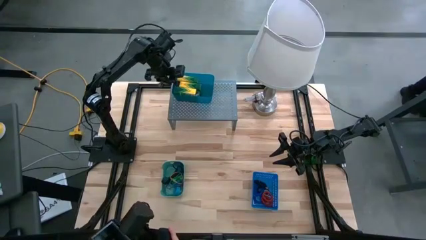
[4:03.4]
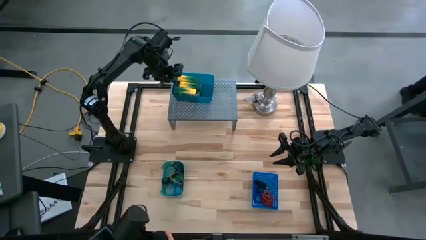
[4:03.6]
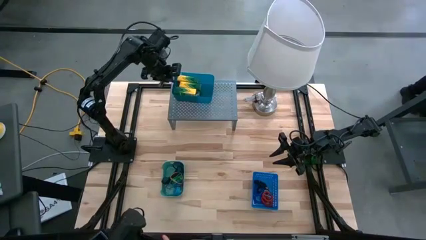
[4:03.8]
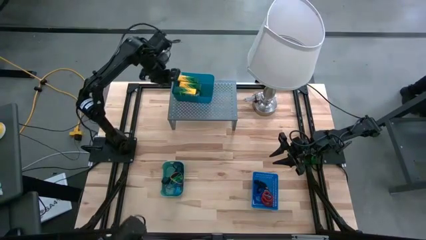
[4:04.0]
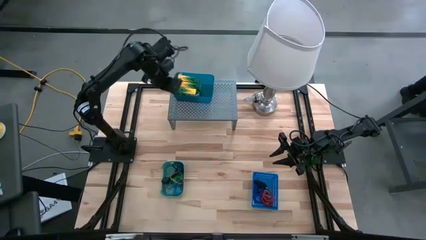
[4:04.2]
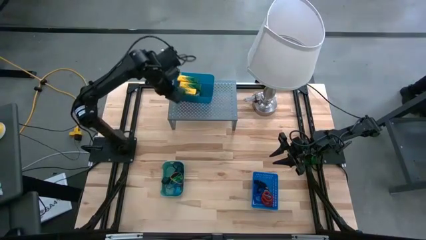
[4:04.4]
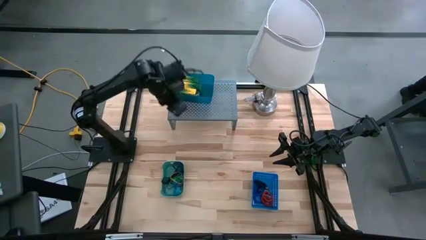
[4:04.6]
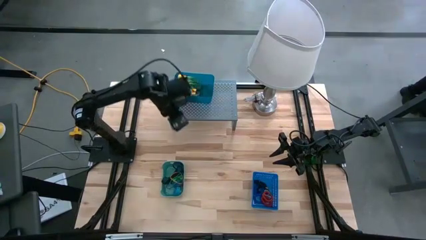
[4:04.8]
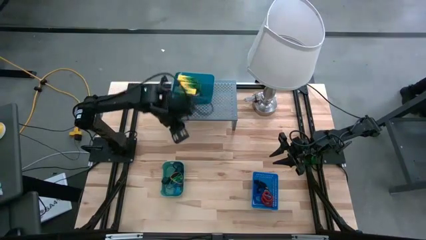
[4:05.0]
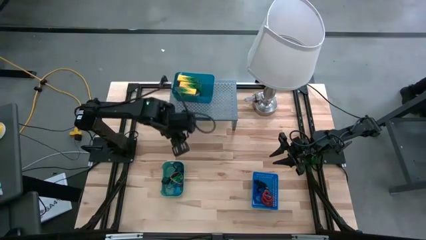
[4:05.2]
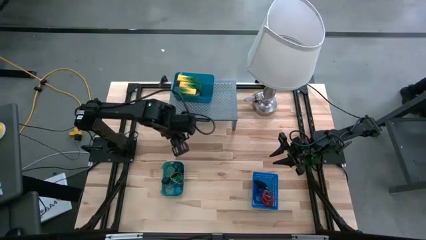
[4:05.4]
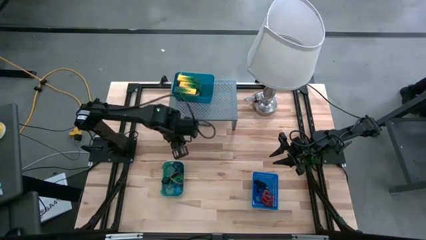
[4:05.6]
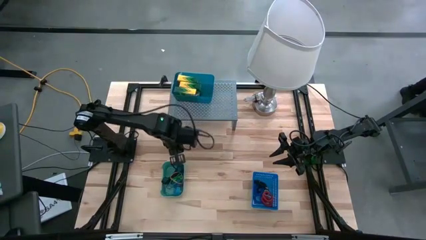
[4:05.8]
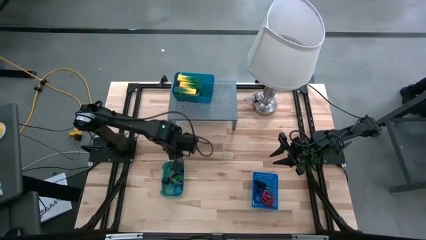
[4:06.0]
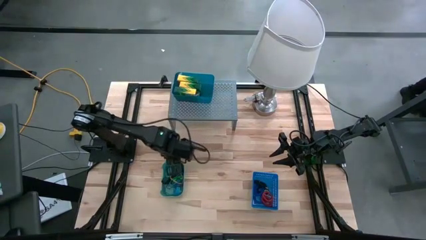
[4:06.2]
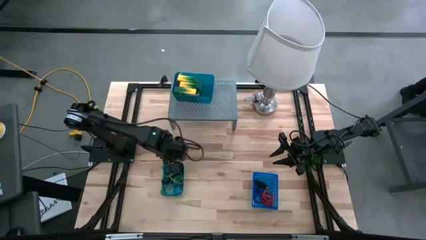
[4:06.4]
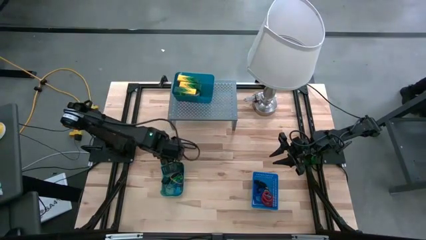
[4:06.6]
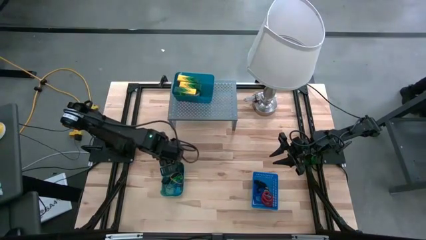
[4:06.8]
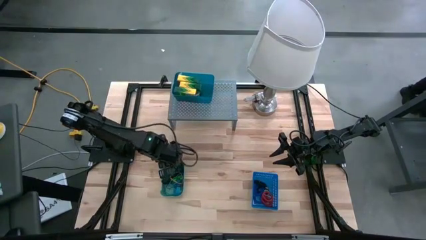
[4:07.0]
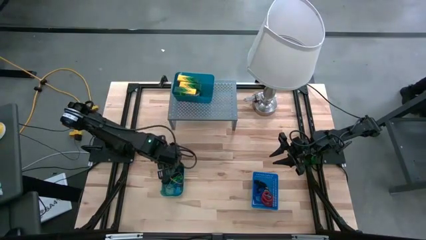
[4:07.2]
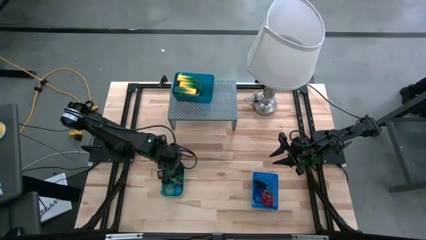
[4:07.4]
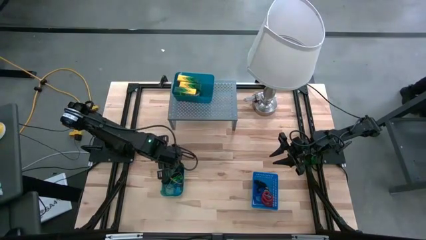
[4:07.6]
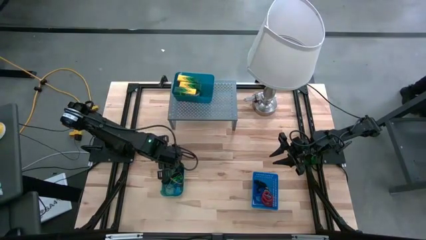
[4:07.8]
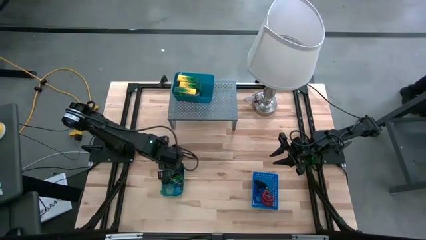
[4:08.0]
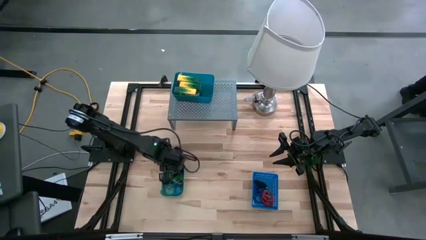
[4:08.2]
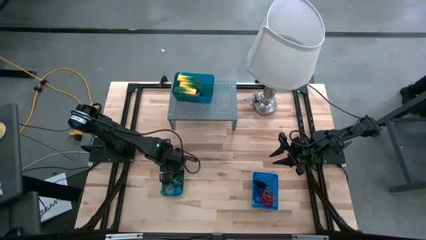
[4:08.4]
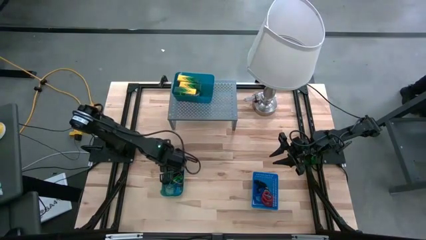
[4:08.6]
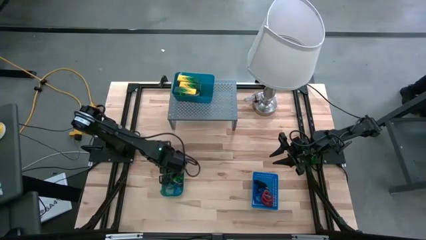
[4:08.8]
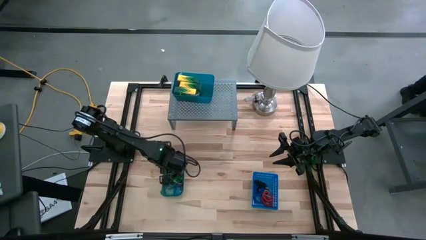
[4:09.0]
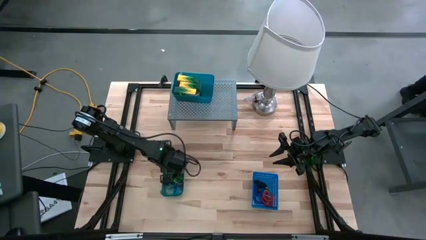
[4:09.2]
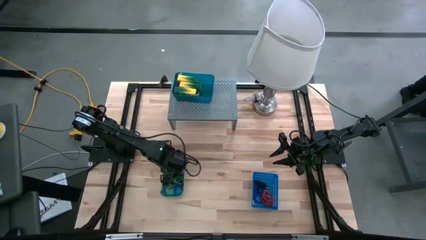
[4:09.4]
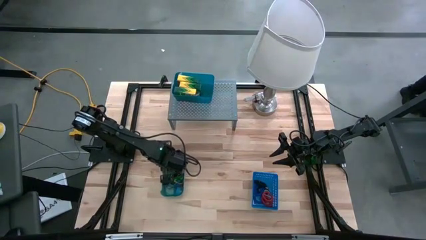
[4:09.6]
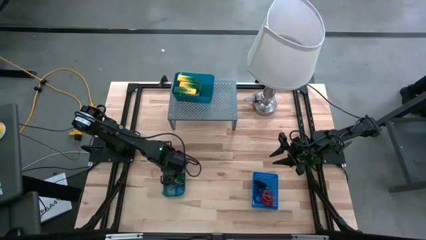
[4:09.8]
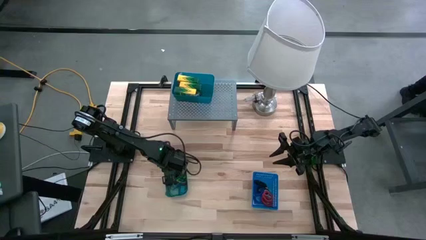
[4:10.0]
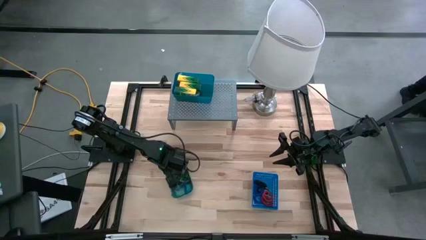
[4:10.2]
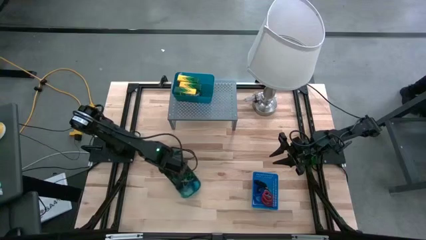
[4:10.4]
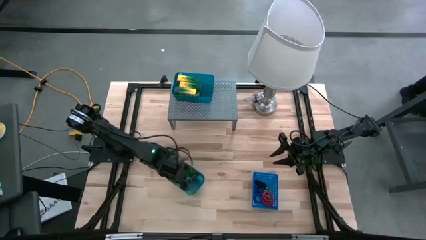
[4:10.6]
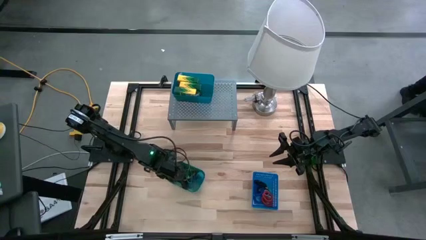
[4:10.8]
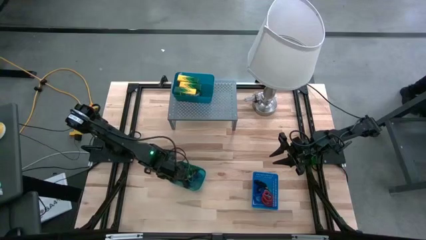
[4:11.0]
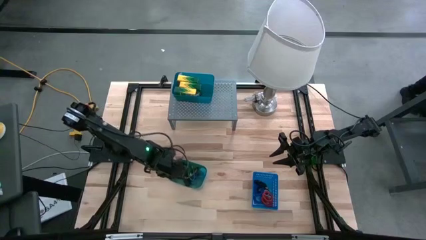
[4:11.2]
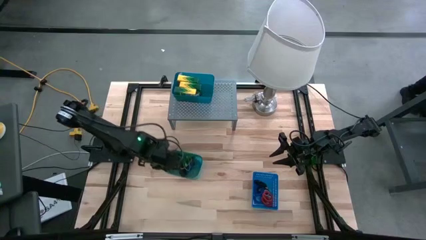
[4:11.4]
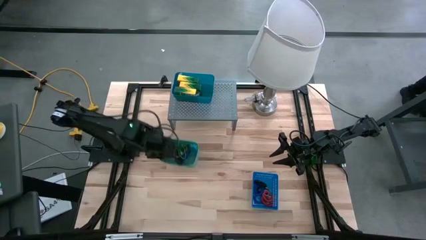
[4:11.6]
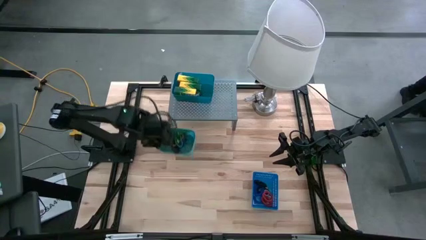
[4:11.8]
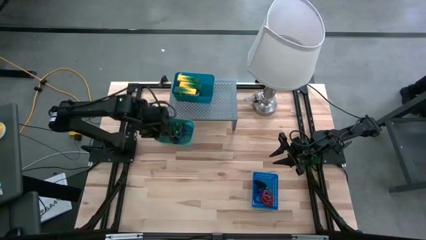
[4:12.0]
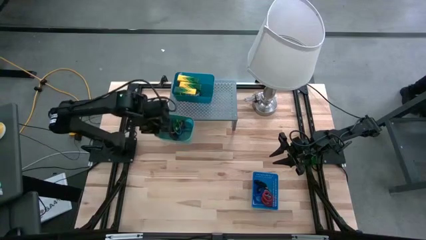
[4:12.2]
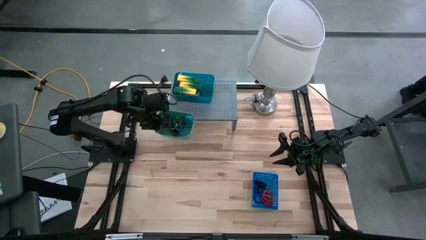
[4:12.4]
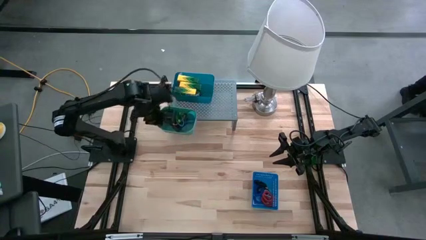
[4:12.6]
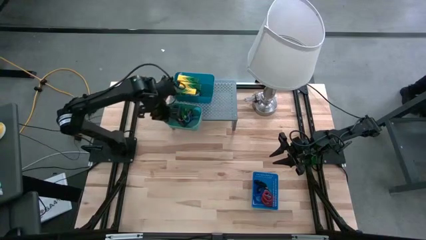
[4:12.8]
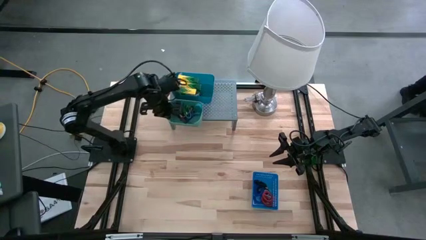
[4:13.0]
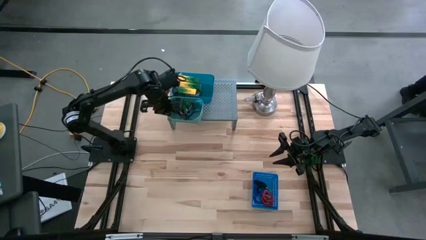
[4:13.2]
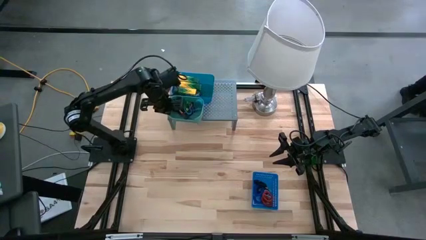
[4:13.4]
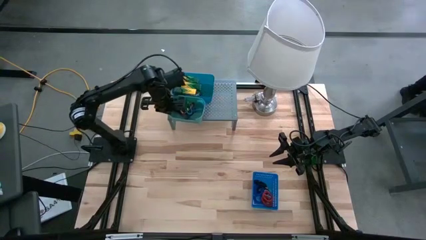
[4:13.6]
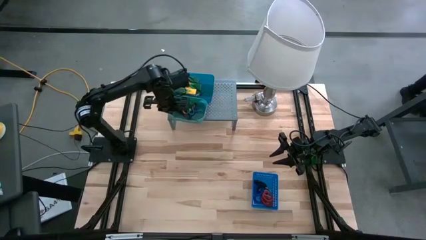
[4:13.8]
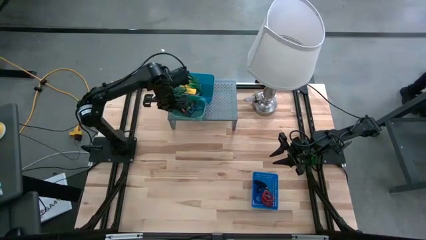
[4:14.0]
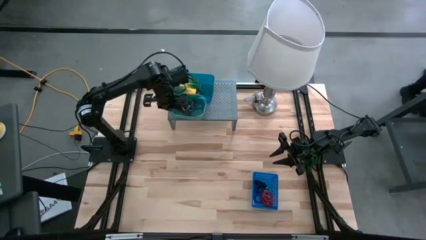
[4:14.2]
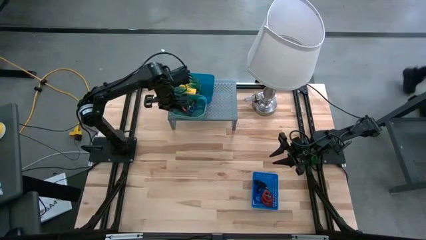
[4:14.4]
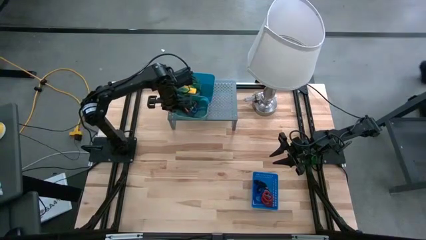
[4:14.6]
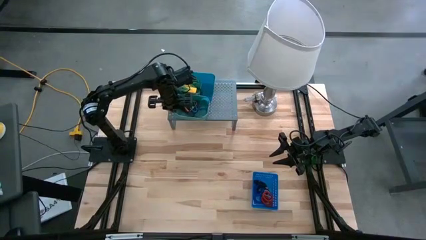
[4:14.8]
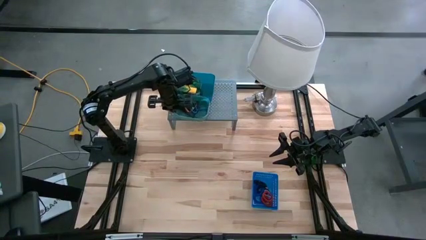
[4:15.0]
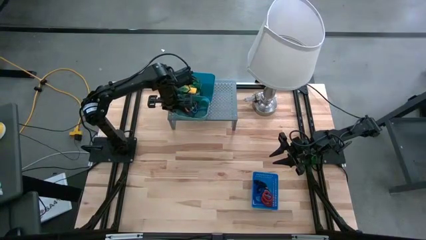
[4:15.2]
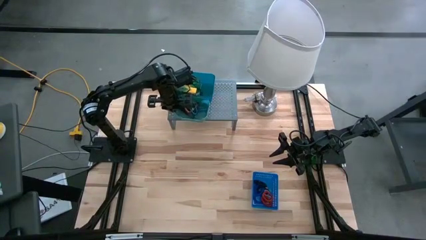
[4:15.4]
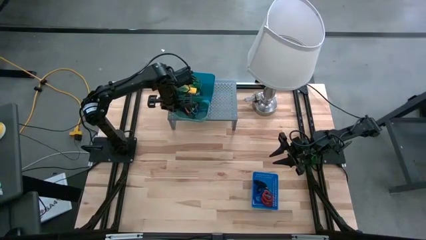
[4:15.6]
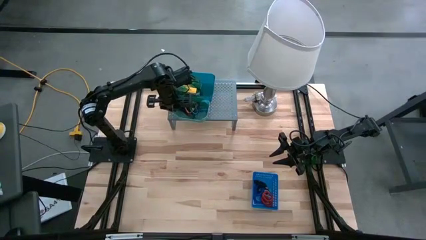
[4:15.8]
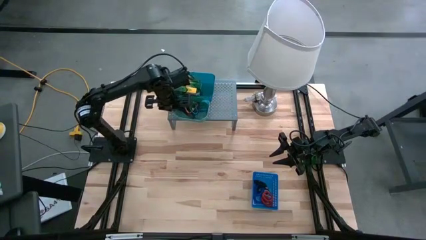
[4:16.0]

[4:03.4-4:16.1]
Task: Pick & Place Office Desk Supplies
Put the green bin with rubber bands on the shelf

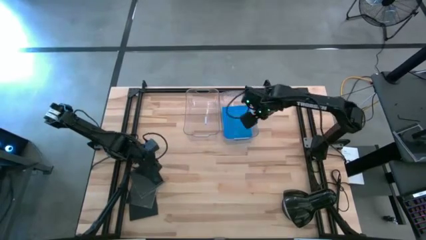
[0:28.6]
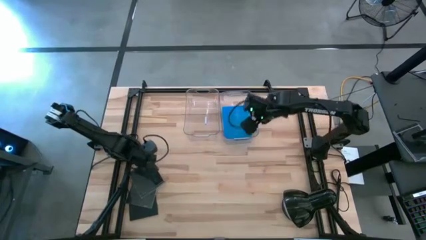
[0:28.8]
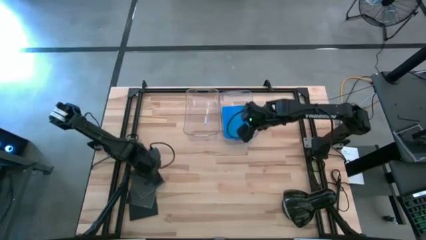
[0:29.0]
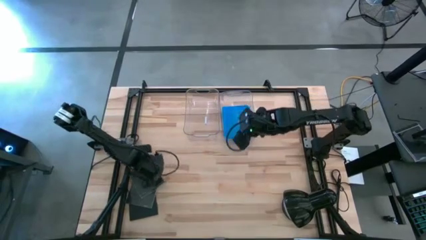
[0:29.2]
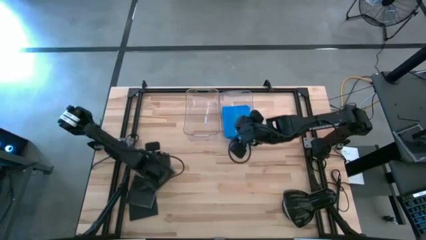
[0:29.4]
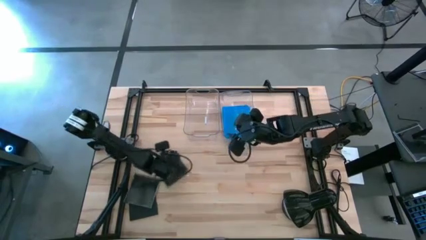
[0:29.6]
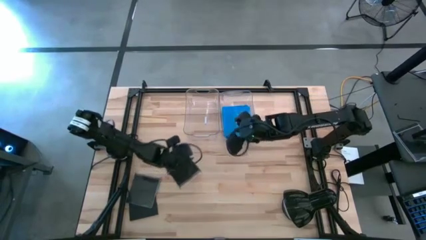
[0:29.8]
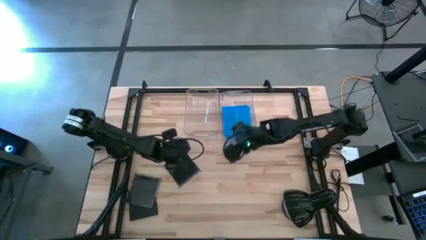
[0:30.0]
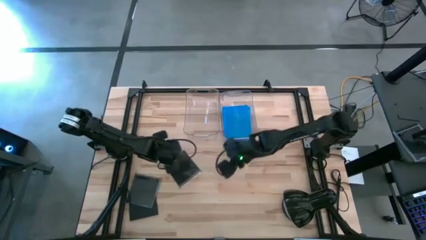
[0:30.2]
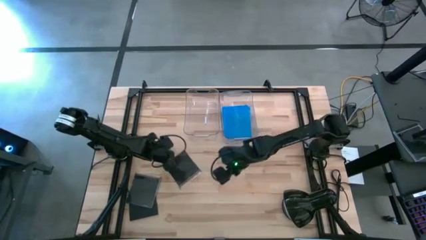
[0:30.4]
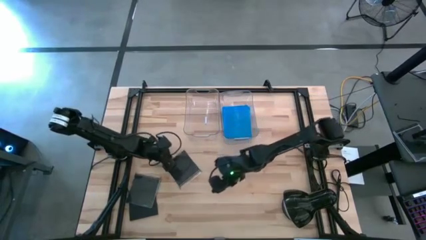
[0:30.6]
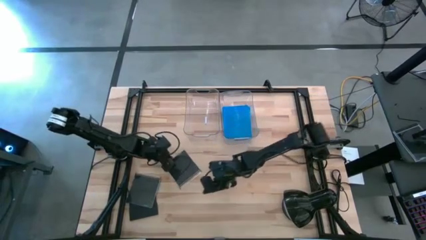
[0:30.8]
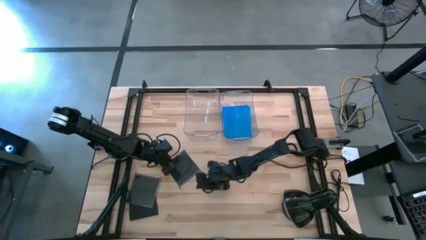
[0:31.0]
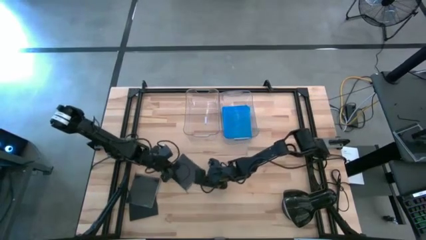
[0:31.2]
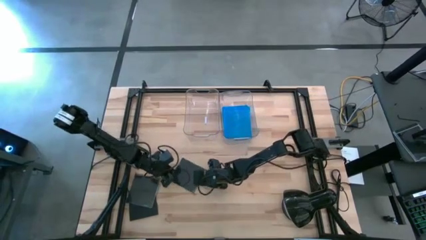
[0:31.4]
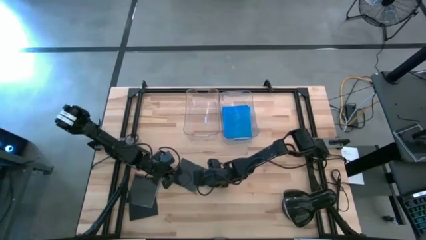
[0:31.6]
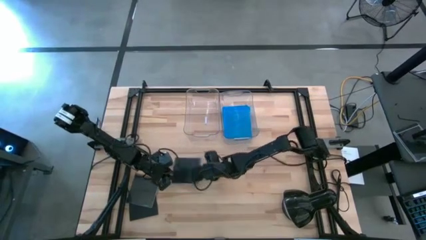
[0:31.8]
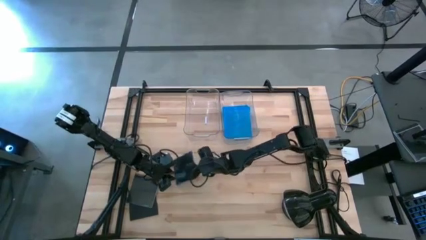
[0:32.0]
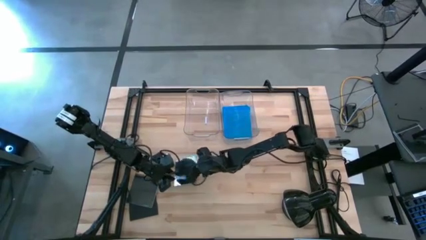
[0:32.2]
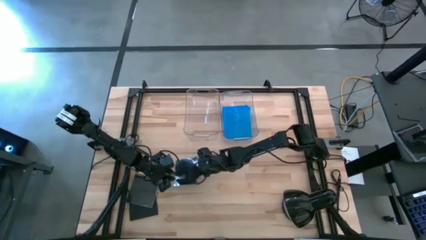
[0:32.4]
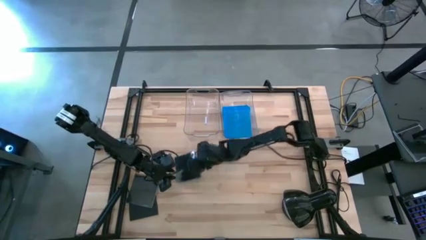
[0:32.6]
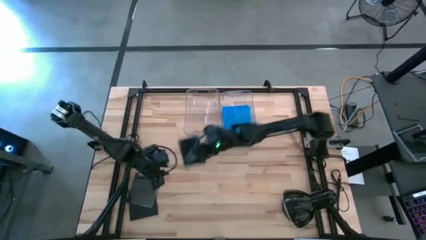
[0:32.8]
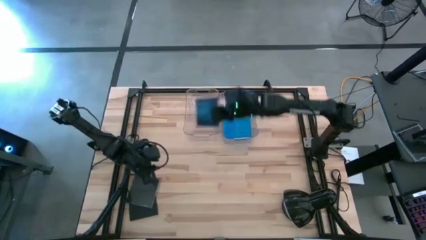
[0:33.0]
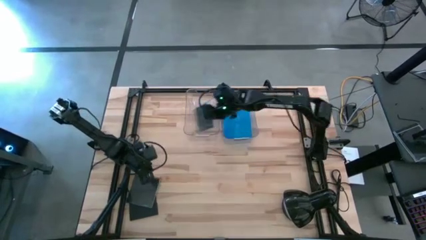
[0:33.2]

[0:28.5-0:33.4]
Task: Pick & place jewel cases by type
Put the top black CD case into the left transparent bin
